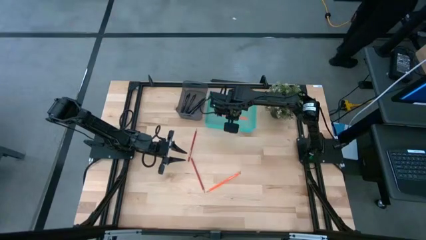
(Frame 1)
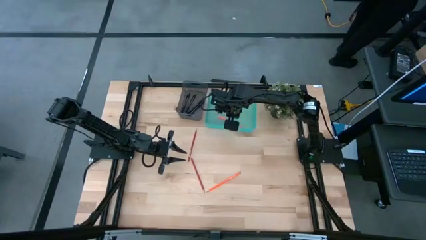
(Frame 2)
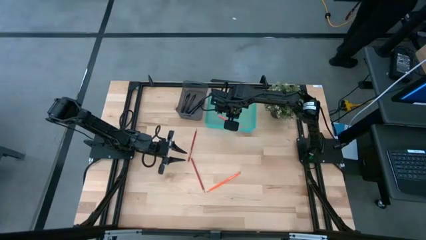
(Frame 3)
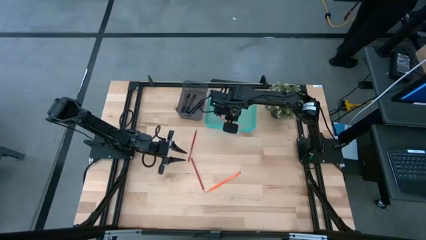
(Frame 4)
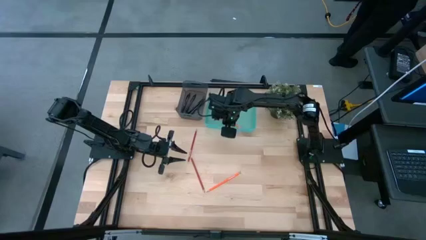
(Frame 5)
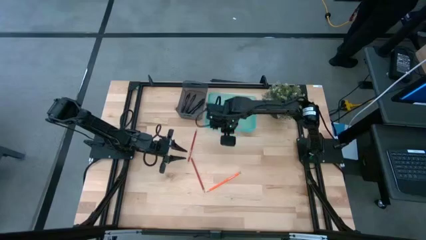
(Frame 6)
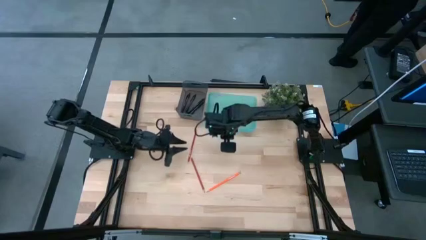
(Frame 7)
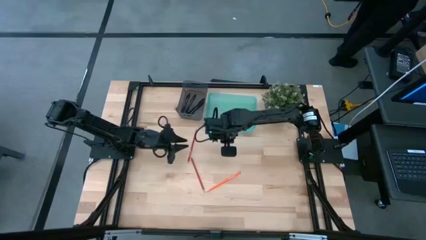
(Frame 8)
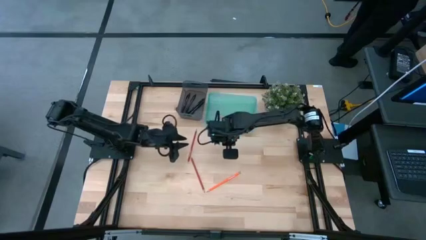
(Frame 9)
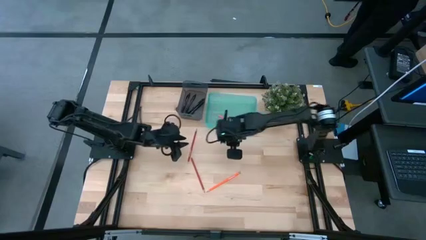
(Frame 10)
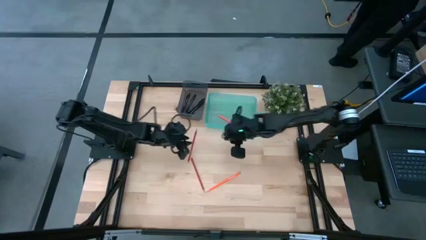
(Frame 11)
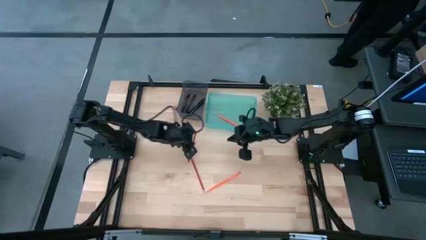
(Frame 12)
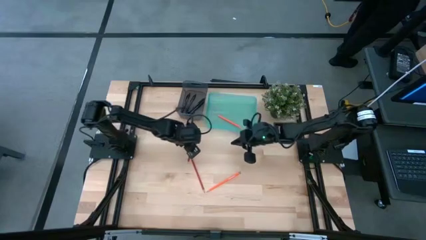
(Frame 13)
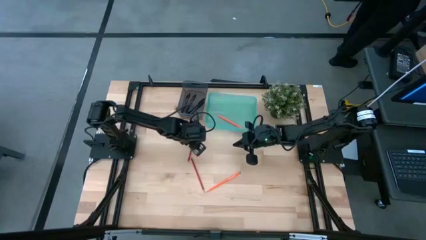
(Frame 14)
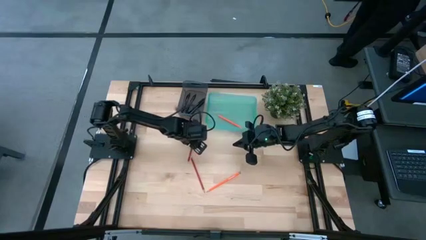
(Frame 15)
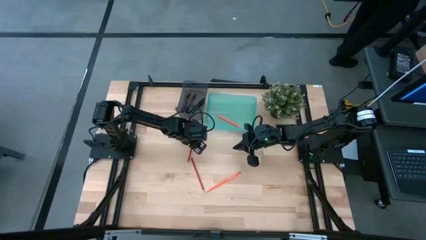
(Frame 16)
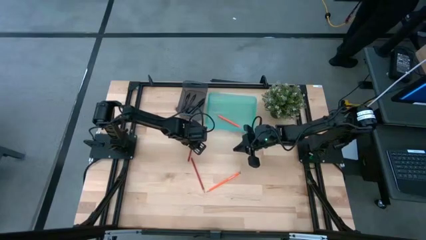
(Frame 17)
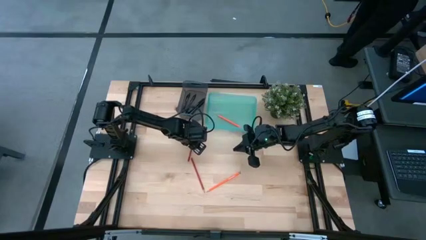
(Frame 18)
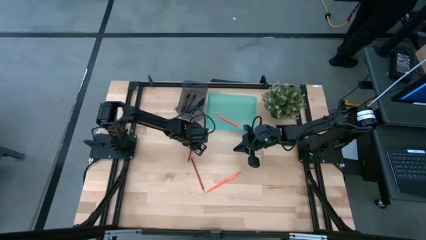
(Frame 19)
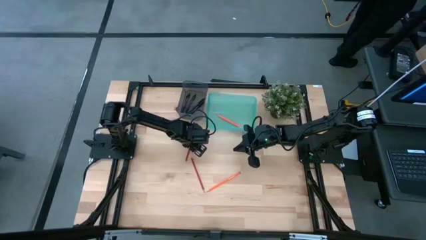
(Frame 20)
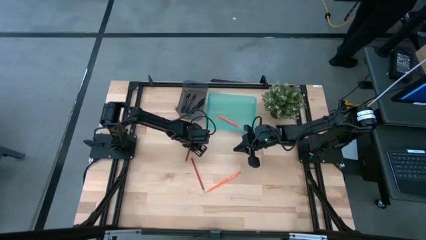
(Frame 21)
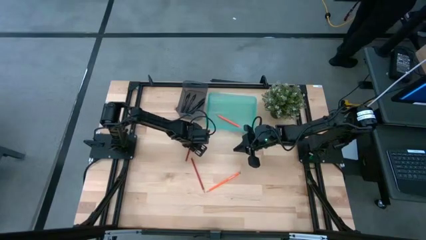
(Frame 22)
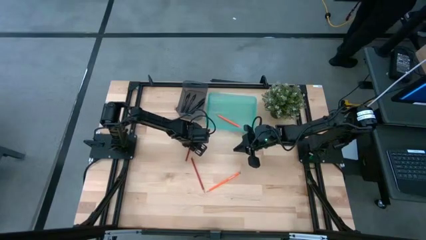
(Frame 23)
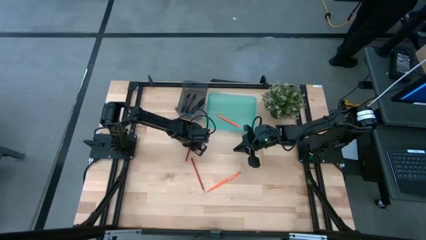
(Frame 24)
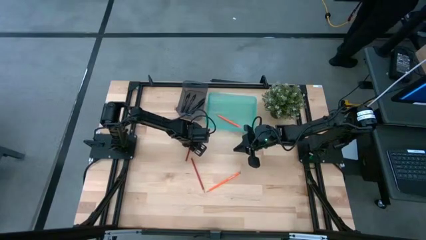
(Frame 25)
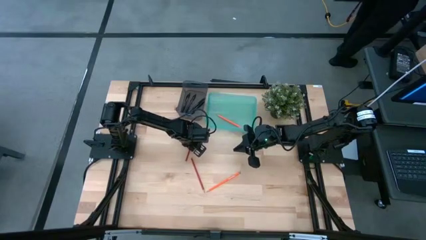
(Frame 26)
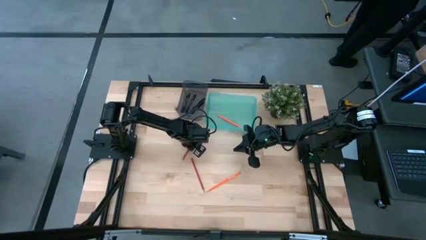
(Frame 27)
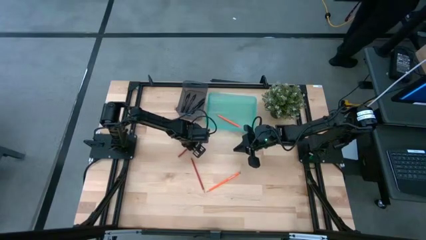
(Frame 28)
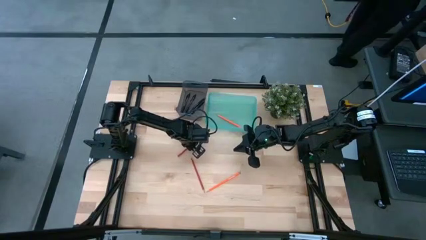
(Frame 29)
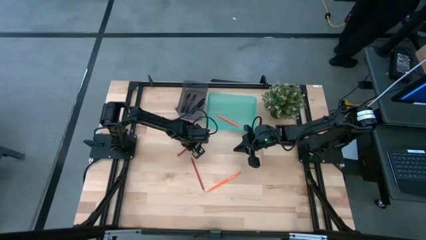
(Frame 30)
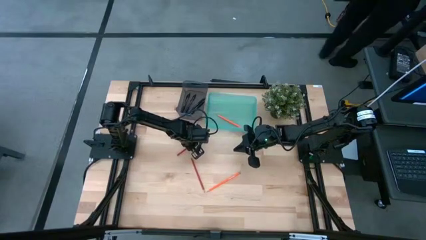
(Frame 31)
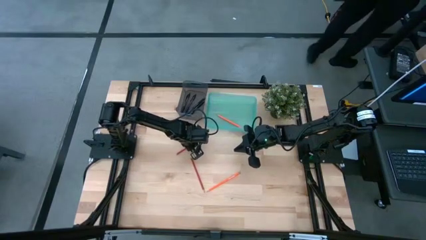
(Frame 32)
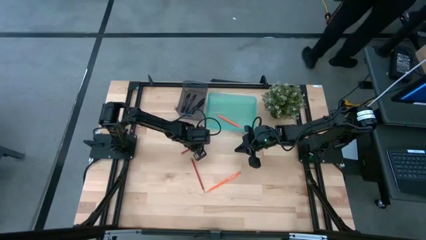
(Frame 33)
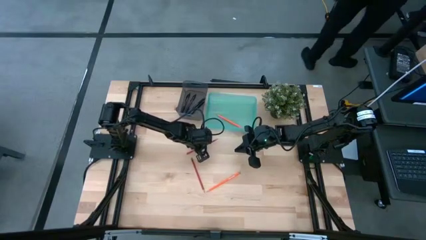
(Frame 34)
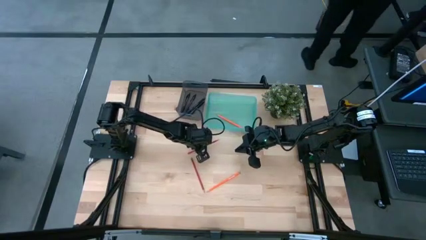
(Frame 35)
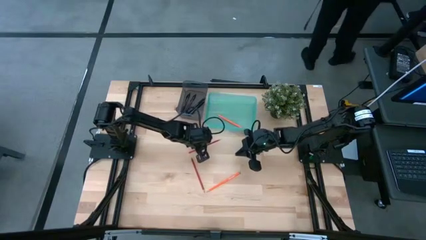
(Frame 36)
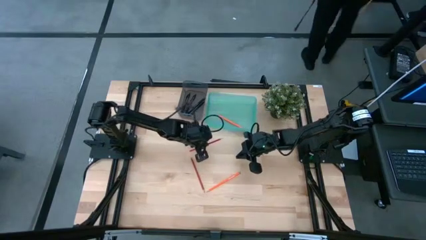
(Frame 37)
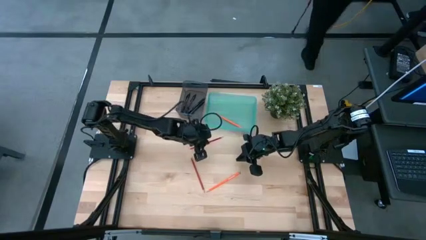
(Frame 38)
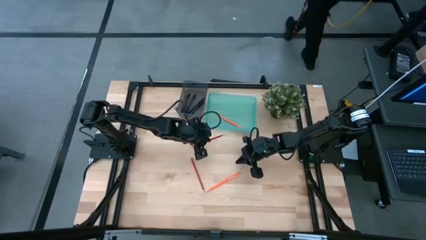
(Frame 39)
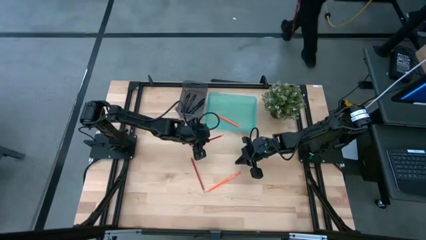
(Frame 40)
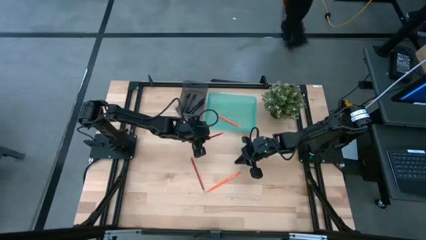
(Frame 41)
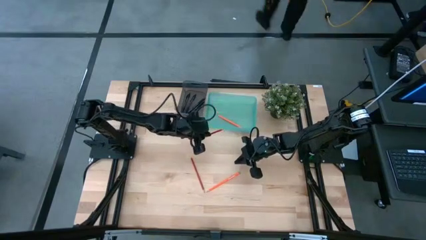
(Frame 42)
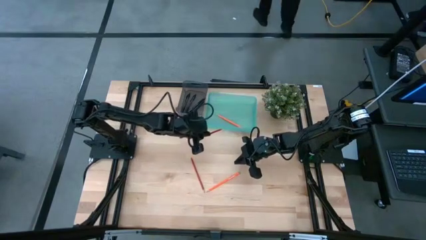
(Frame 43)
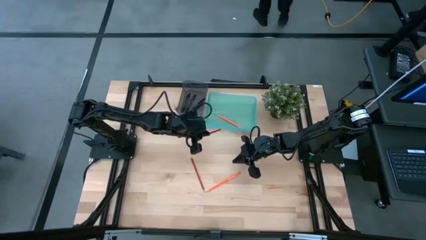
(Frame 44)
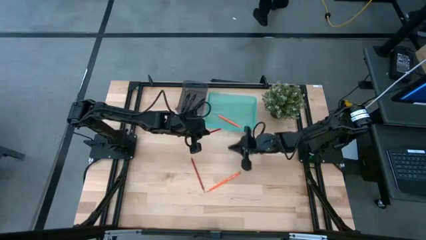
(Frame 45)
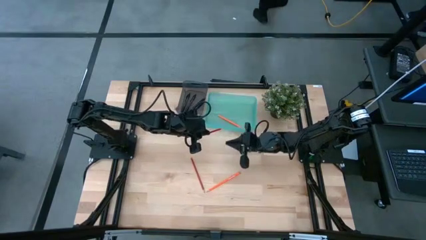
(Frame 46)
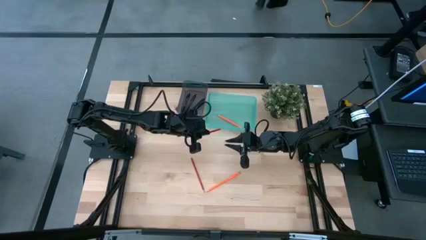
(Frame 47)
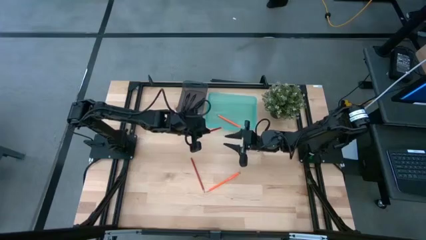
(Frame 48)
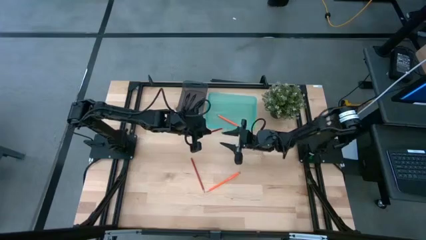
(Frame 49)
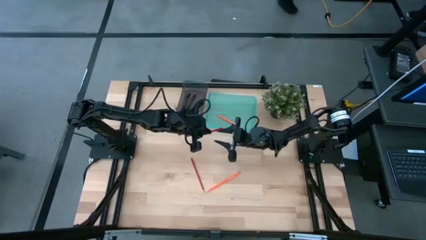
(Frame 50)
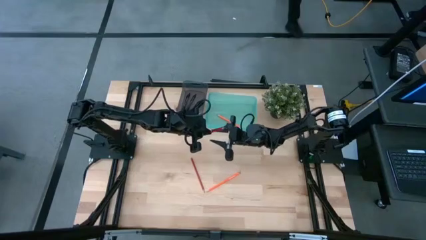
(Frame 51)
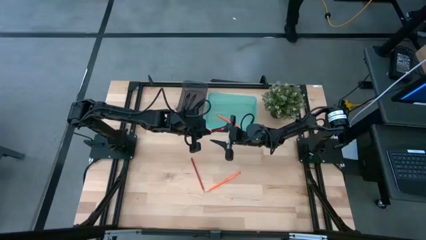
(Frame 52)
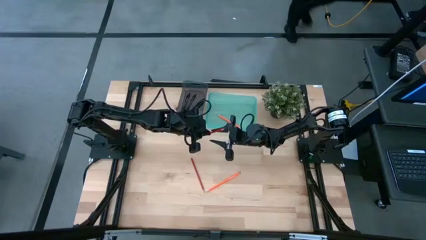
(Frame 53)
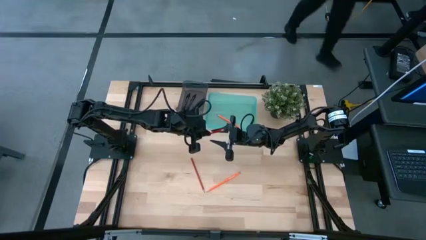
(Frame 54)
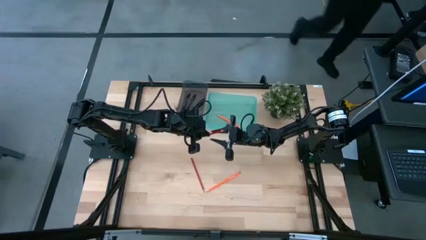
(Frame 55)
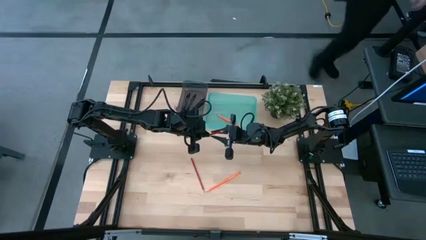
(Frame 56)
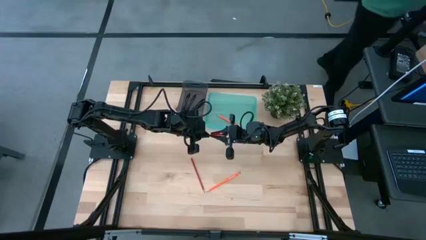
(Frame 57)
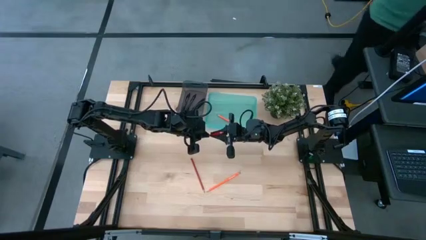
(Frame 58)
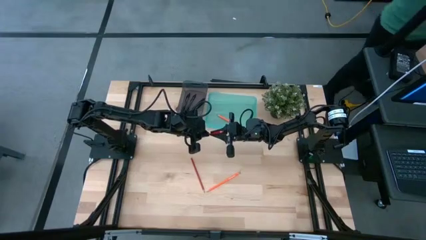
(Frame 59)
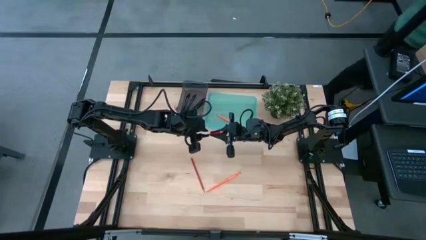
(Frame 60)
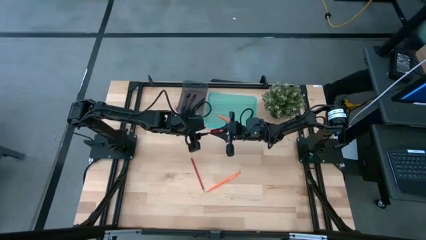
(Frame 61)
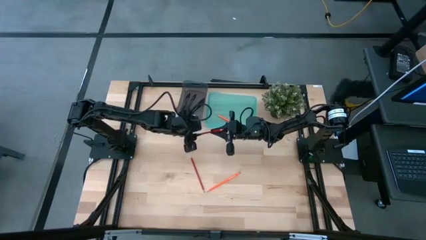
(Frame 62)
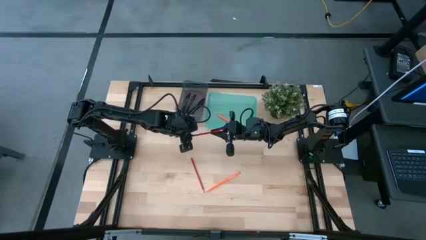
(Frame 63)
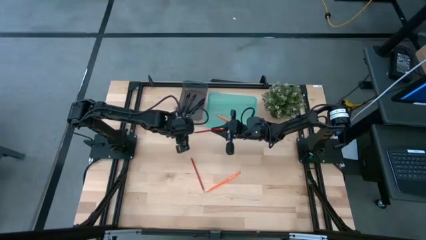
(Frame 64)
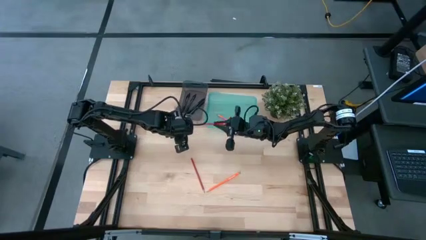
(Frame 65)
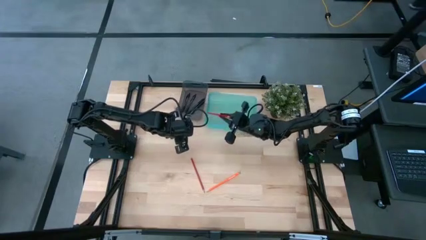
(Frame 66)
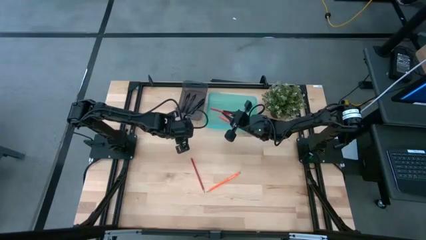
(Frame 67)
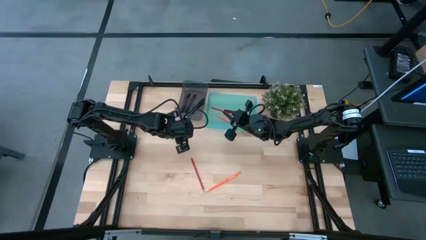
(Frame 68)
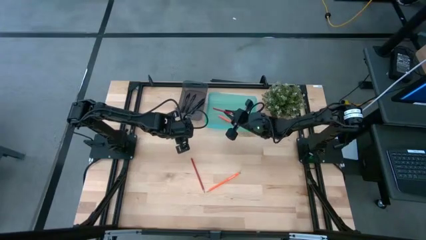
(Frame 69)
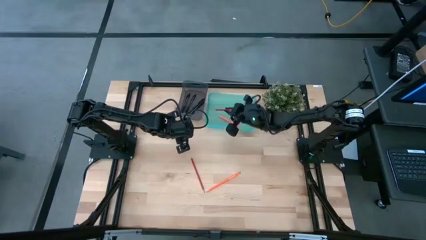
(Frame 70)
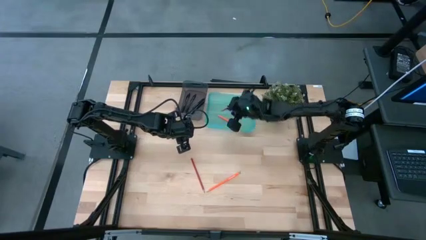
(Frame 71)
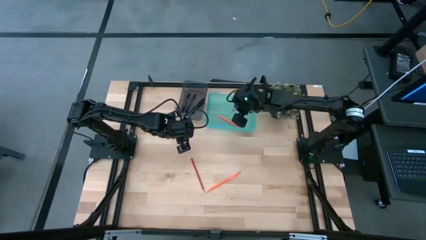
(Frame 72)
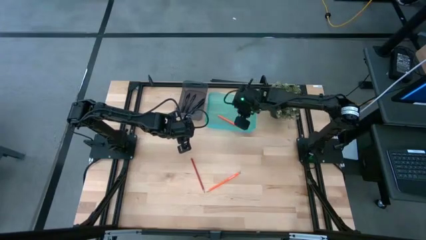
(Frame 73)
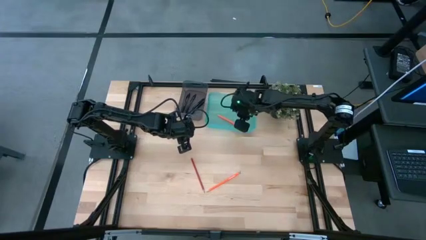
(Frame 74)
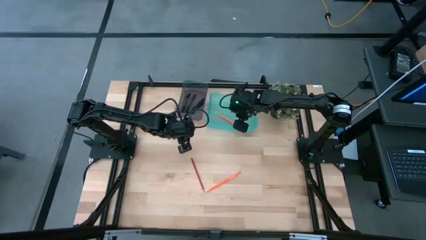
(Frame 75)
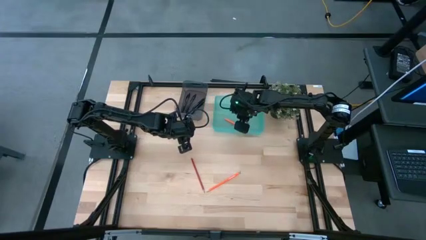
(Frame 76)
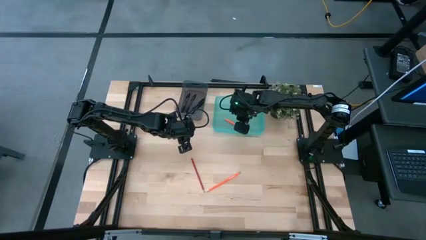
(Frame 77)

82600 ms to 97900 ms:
Task: Sort pens & pencils
Put the red pencil into the green bin

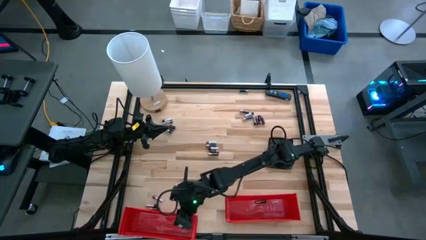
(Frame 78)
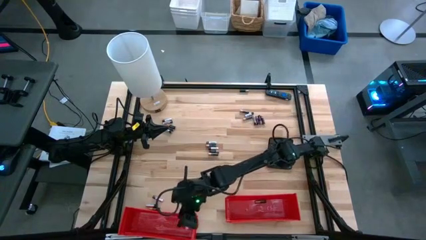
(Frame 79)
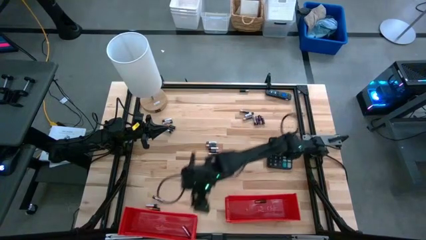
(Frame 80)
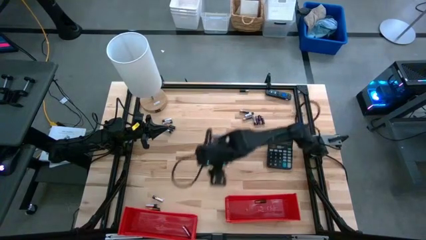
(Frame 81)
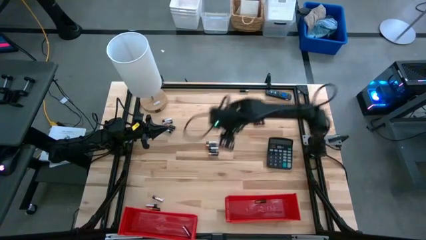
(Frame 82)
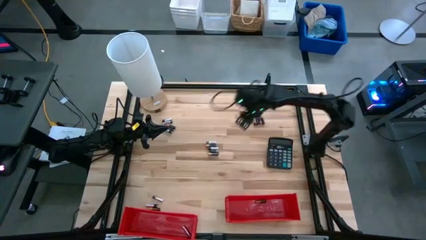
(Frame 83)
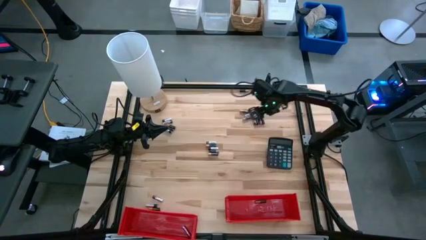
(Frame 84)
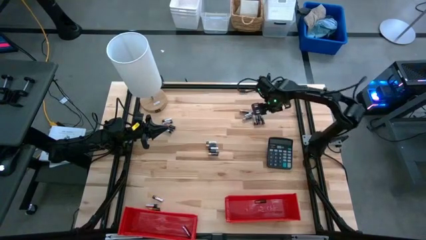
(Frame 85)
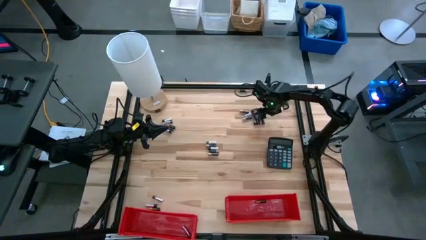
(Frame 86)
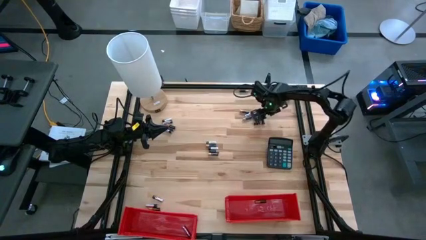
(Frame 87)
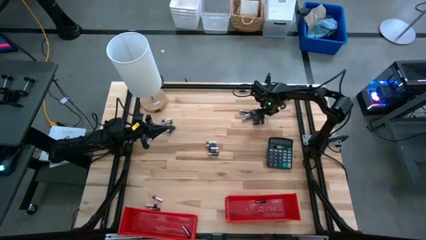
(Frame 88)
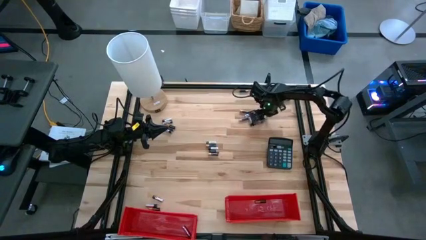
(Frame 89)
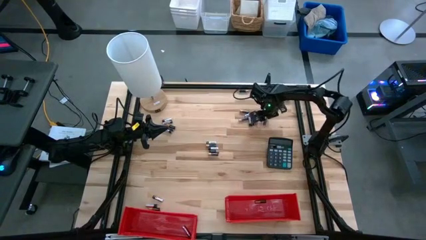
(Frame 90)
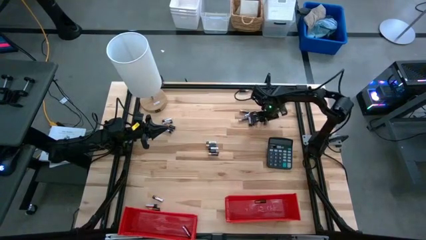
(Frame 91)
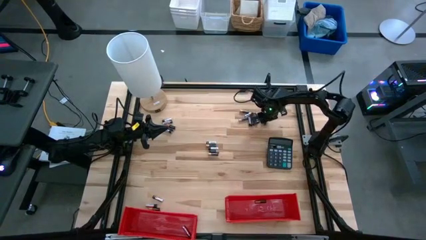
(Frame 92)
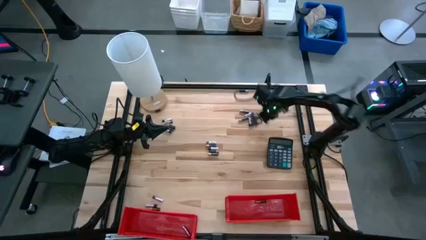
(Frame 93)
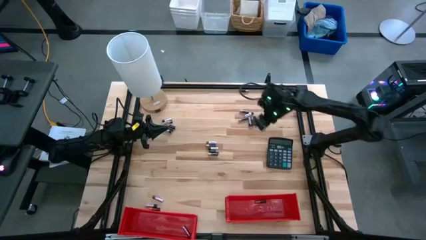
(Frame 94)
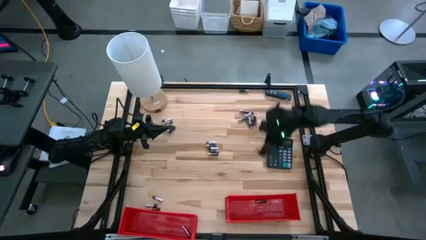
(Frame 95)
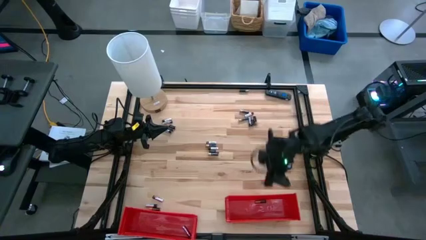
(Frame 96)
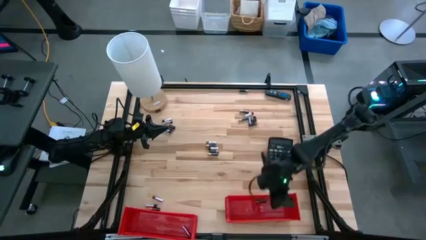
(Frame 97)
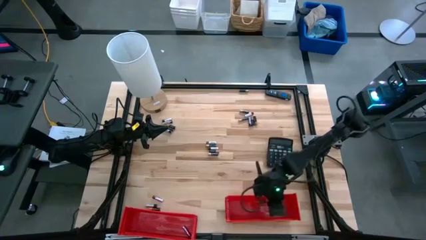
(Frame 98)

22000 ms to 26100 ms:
Task: Sort batteries
Put the black-brown battery into the right red bin
